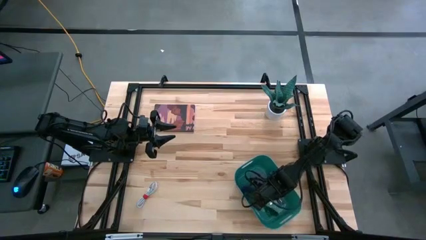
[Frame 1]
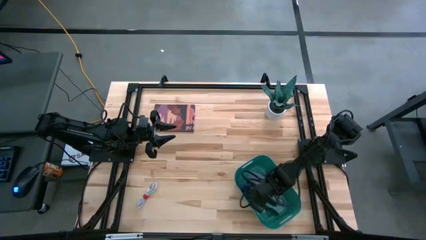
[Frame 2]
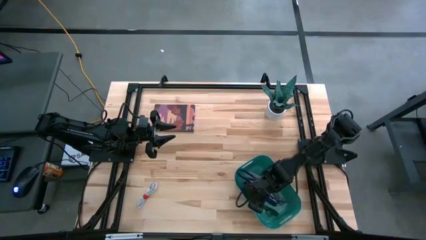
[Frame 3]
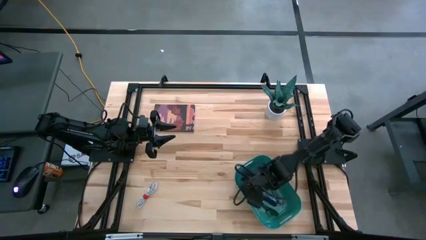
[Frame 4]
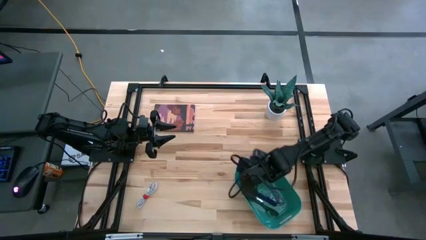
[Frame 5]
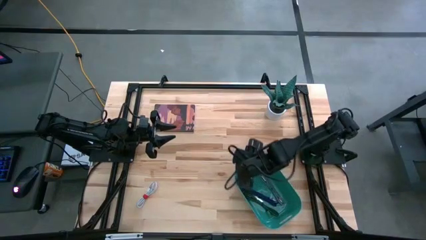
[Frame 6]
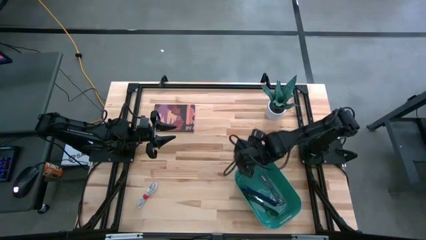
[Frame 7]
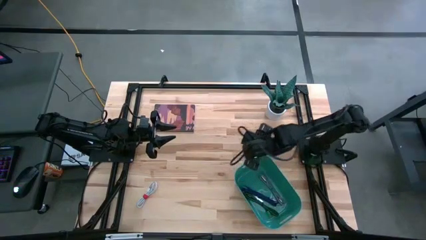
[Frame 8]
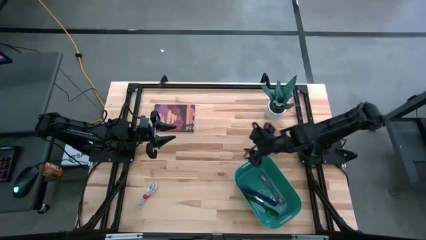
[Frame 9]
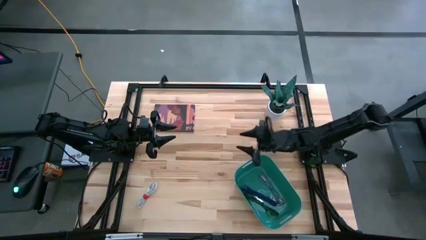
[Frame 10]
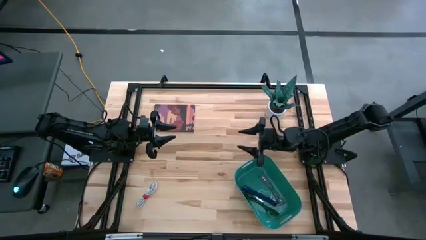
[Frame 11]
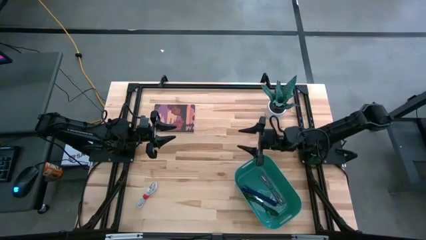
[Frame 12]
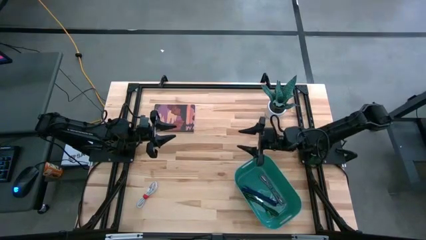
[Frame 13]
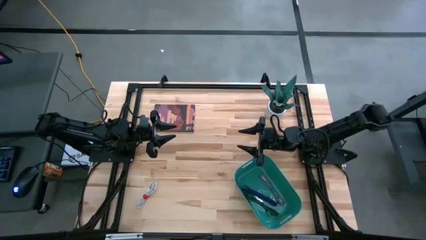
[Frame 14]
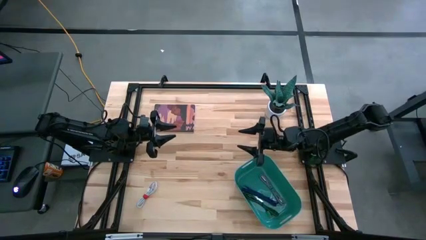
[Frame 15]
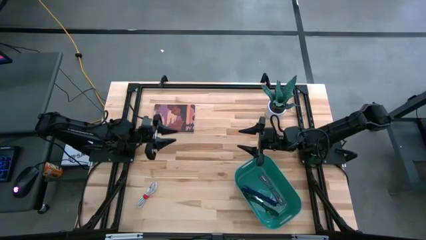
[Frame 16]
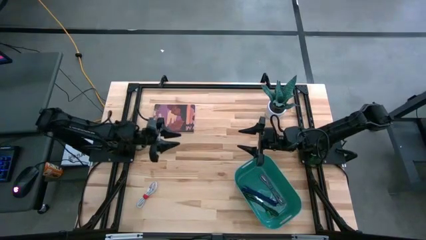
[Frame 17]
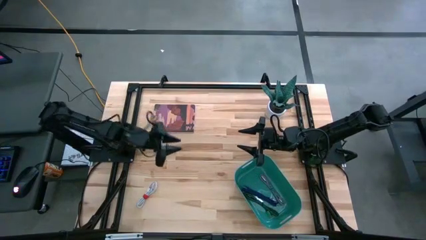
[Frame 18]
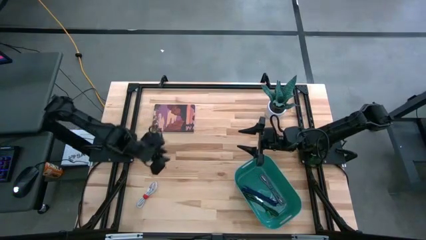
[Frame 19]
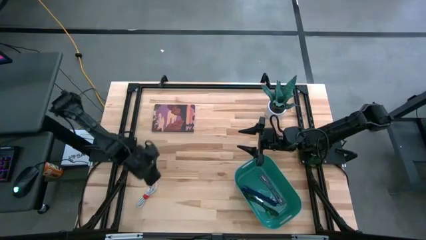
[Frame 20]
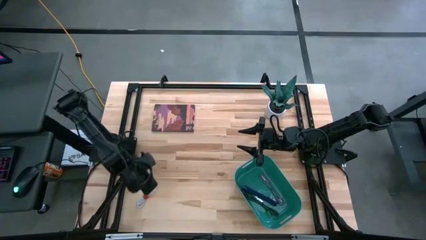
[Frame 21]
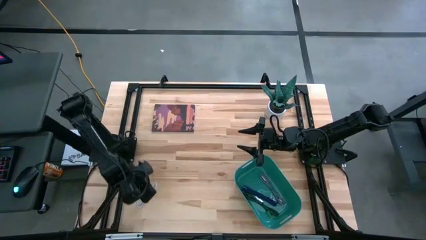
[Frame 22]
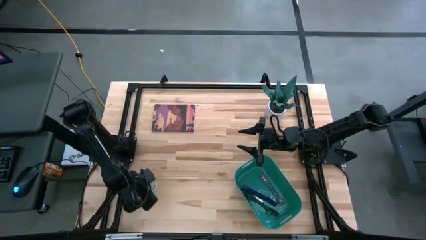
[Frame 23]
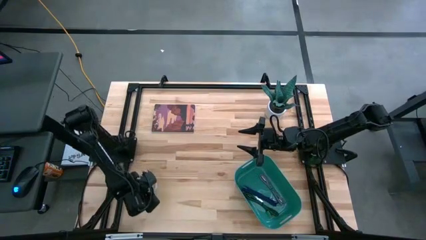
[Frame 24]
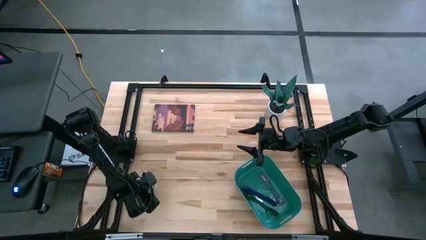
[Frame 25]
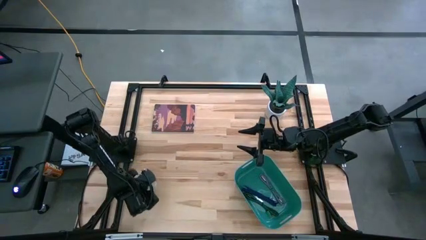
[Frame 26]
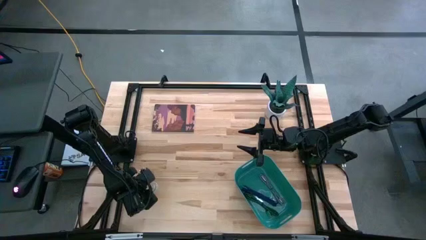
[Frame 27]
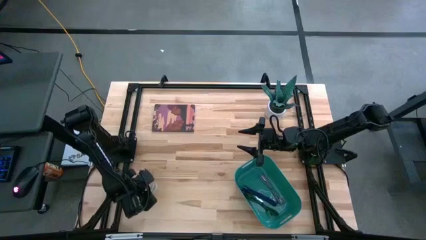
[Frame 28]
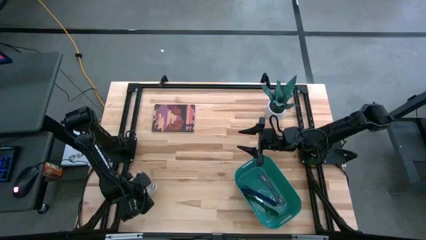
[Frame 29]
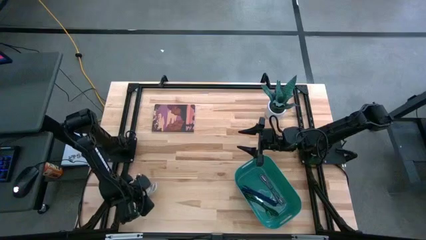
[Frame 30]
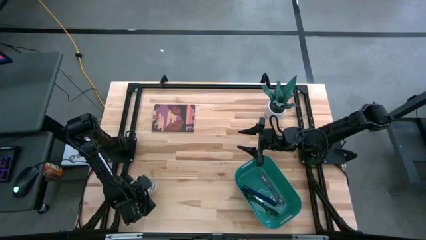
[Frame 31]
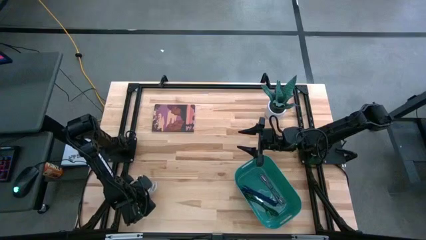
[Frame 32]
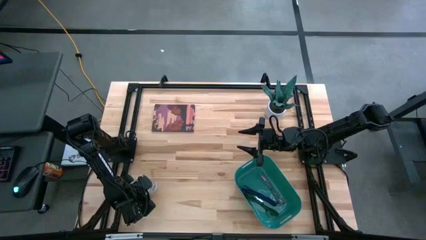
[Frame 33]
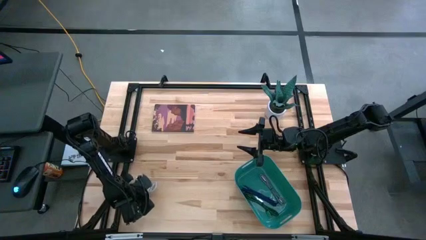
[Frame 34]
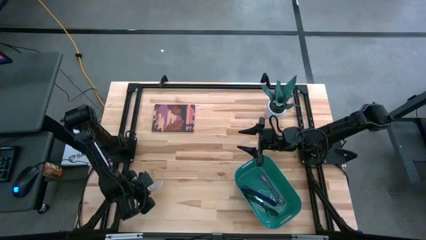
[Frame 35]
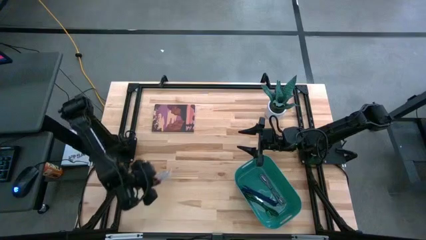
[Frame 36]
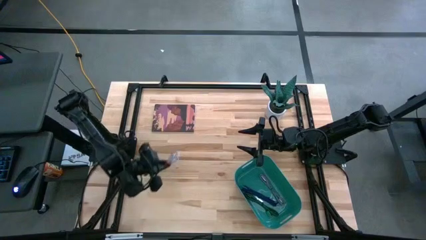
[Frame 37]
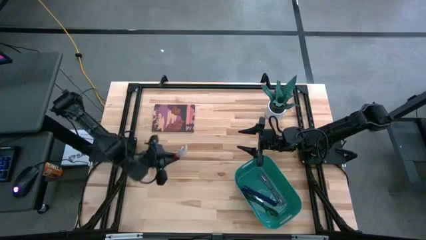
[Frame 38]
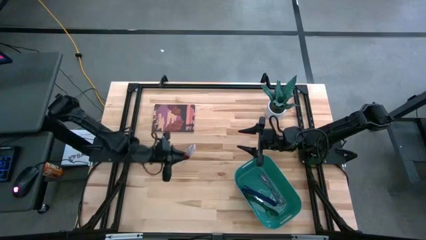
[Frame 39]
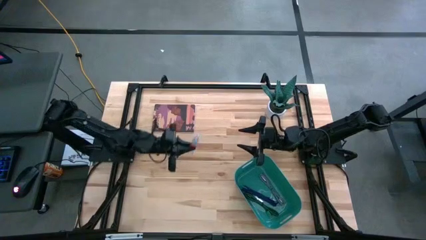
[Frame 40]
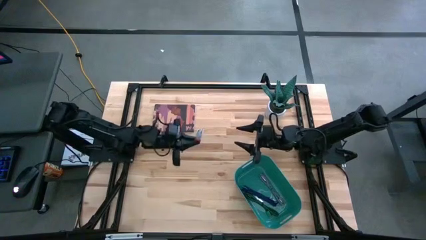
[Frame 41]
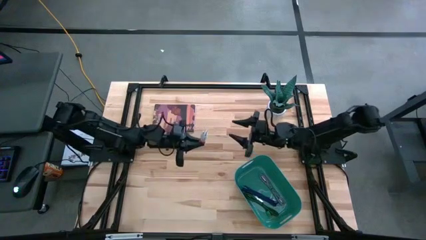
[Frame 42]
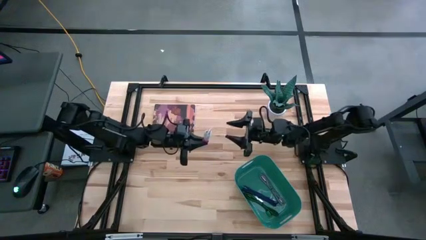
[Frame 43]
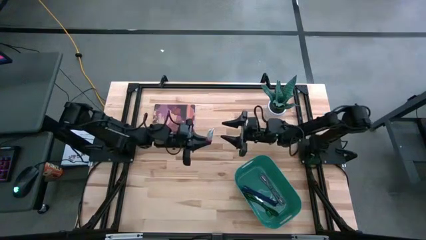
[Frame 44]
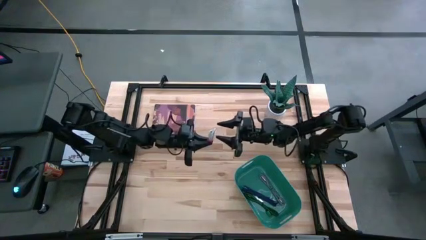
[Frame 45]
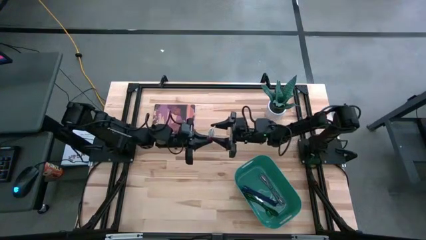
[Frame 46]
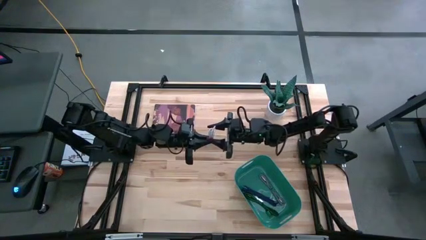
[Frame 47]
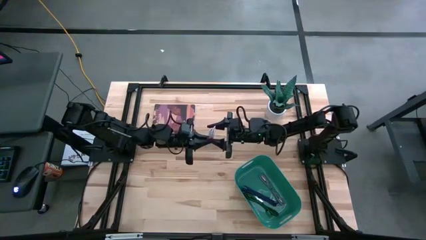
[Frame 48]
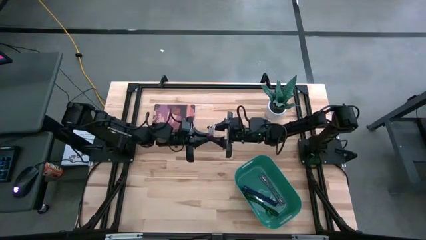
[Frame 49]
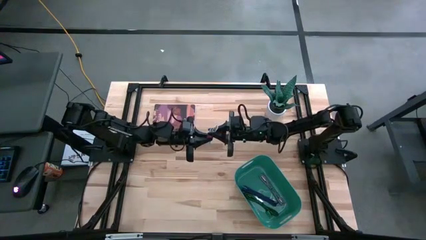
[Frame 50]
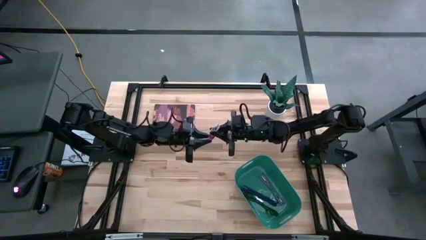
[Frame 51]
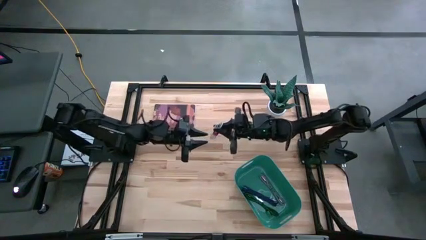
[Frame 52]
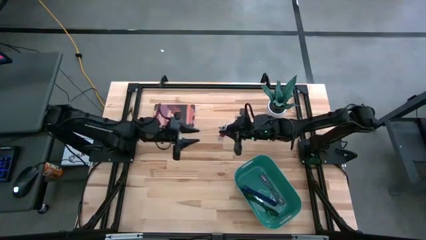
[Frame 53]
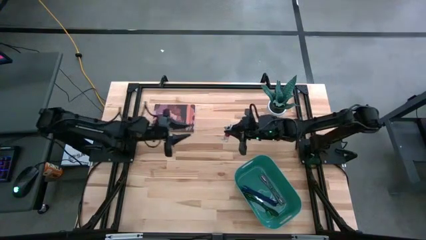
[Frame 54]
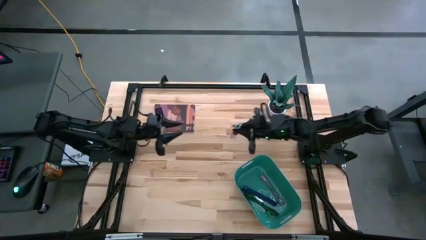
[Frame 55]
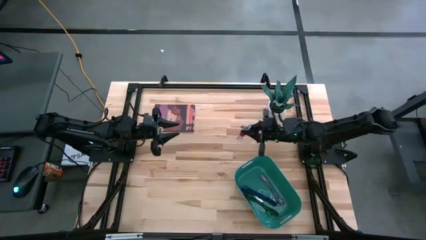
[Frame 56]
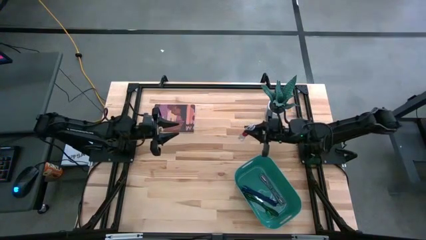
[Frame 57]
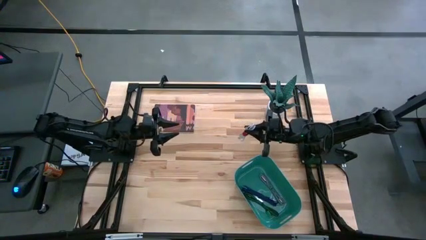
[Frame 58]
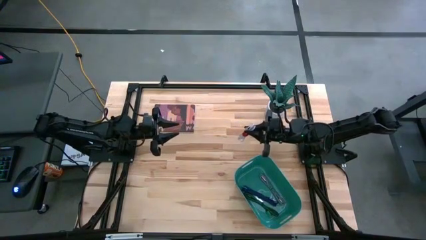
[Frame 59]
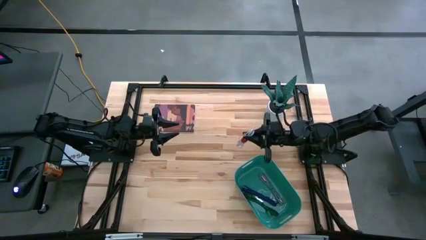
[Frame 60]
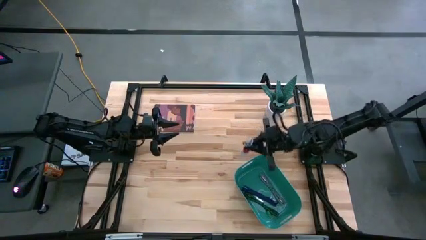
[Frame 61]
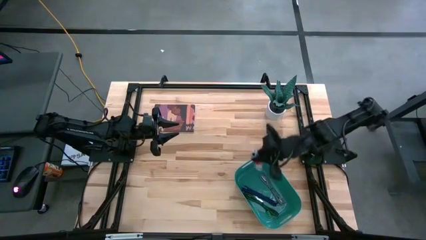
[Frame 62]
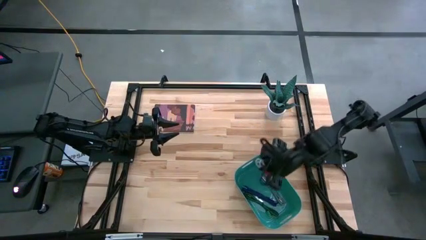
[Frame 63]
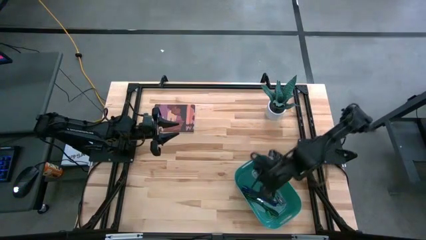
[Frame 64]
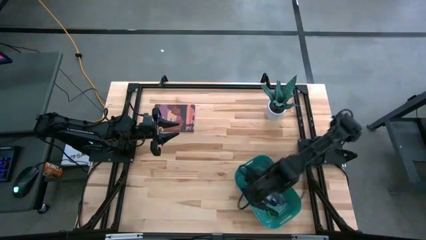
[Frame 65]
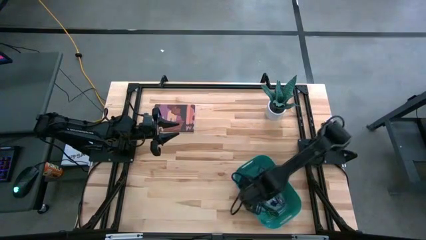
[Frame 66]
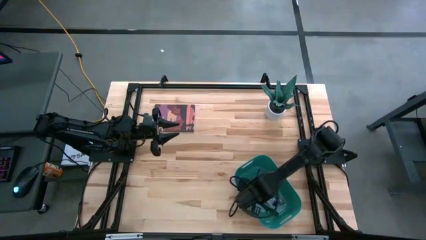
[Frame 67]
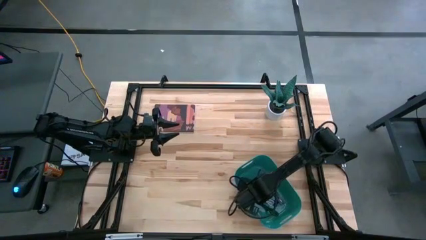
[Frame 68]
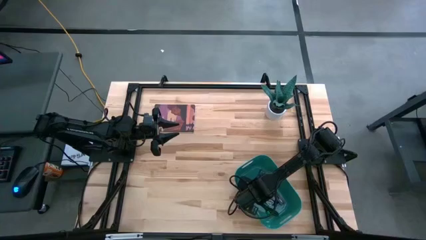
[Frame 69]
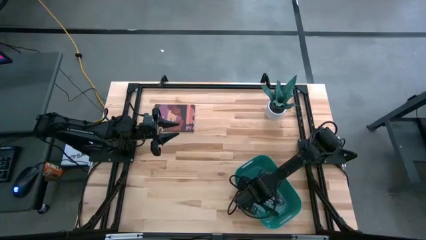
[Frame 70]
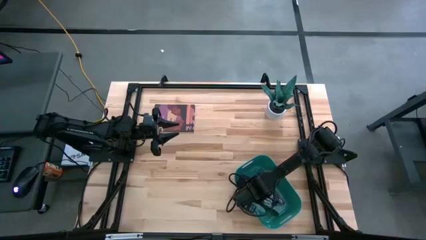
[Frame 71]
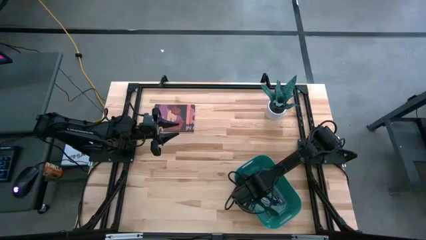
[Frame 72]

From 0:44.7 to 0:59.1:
Task: Pick and place USB-C Cables
Put the white USB cable into the green bin
